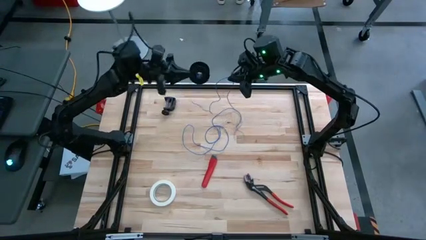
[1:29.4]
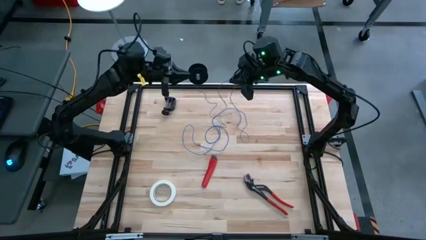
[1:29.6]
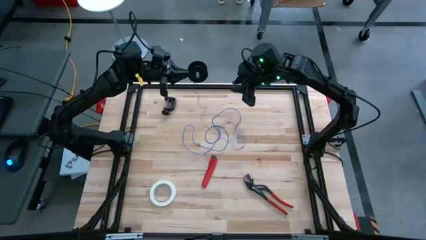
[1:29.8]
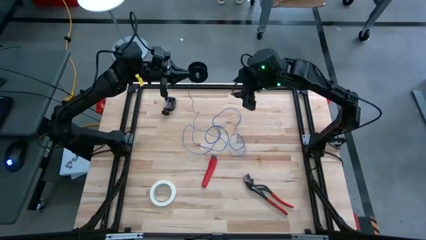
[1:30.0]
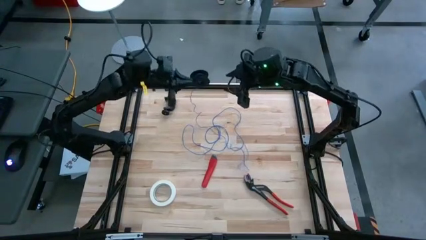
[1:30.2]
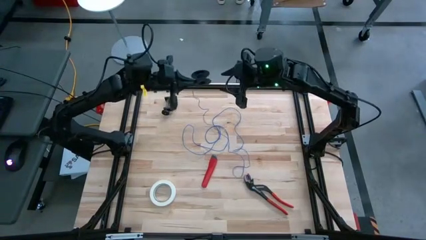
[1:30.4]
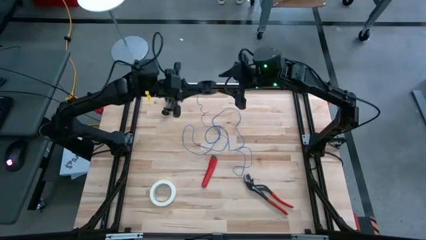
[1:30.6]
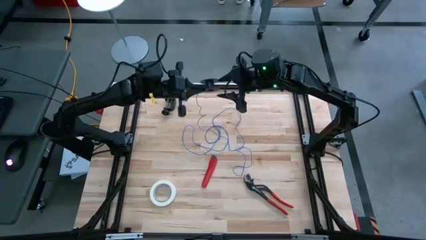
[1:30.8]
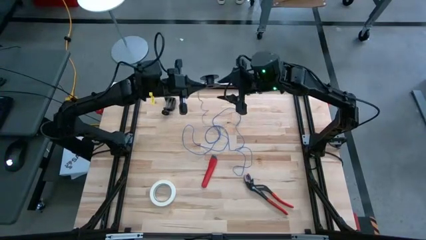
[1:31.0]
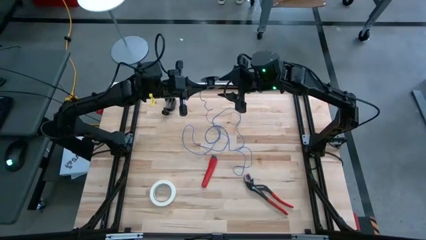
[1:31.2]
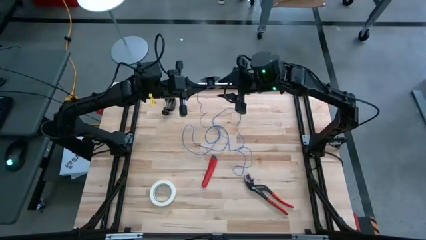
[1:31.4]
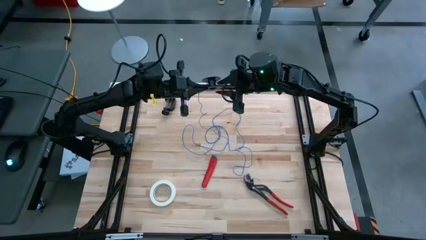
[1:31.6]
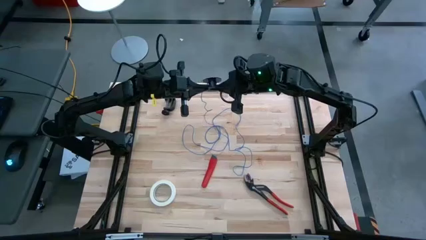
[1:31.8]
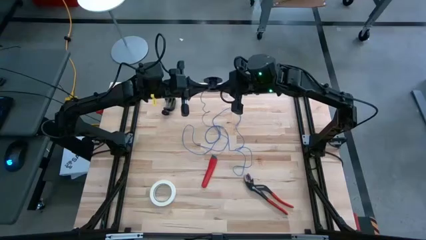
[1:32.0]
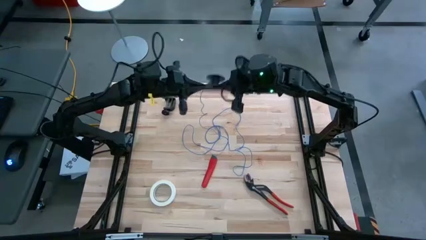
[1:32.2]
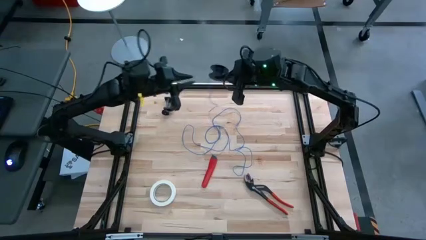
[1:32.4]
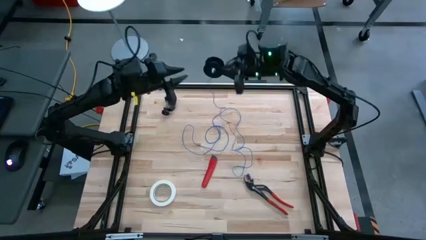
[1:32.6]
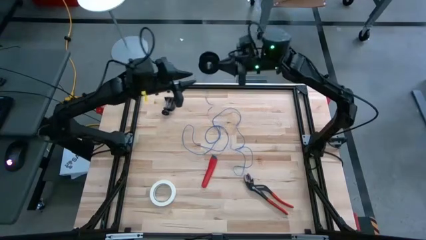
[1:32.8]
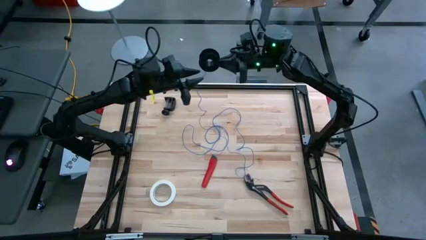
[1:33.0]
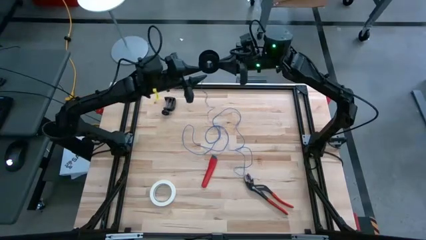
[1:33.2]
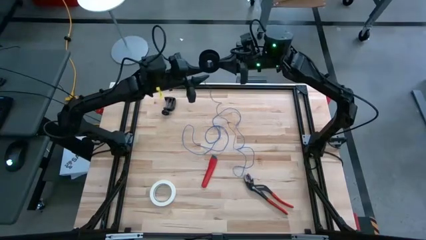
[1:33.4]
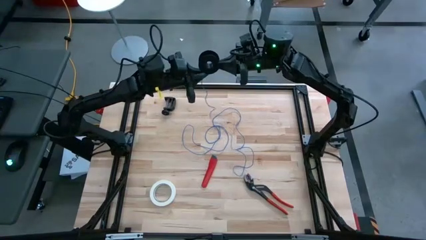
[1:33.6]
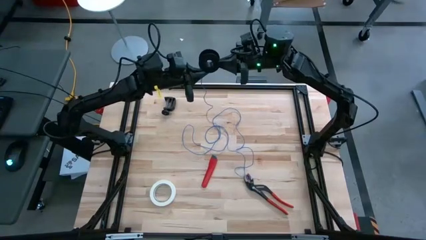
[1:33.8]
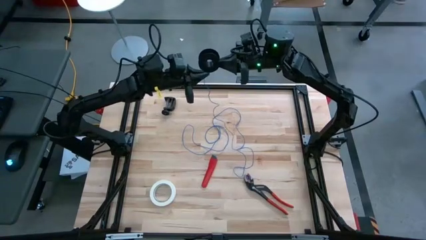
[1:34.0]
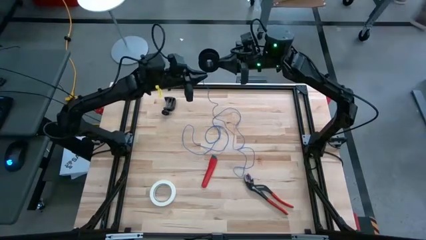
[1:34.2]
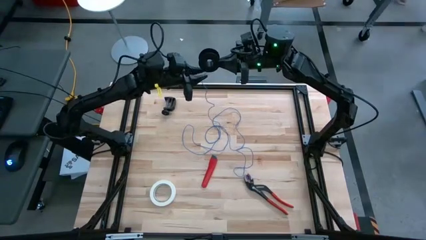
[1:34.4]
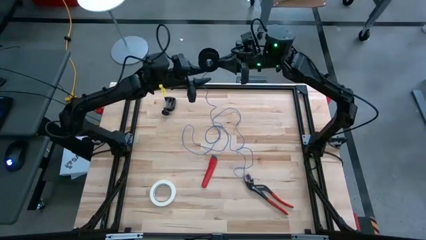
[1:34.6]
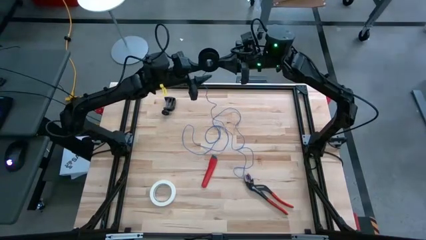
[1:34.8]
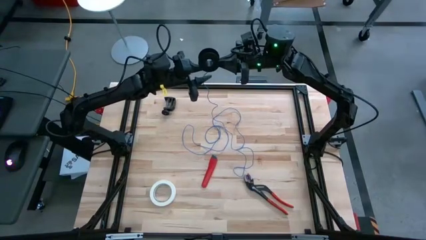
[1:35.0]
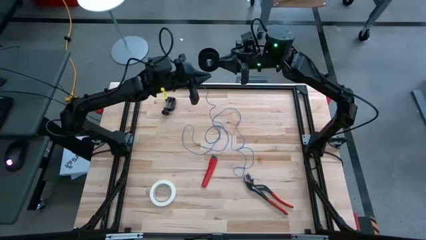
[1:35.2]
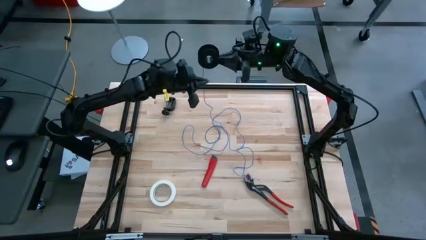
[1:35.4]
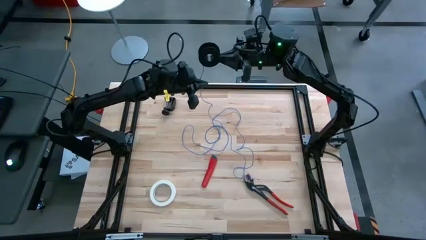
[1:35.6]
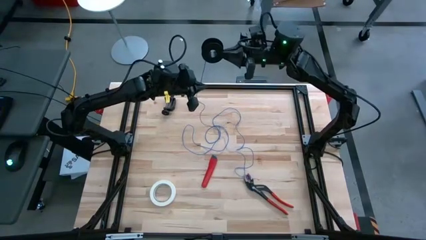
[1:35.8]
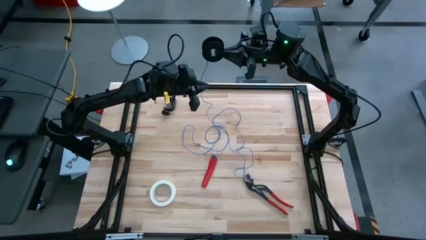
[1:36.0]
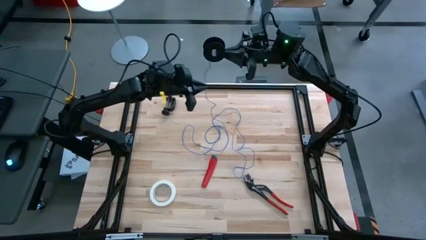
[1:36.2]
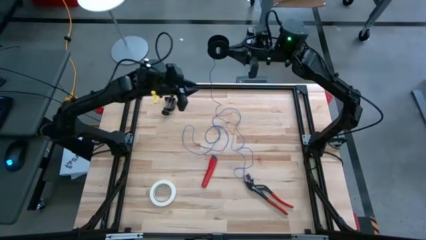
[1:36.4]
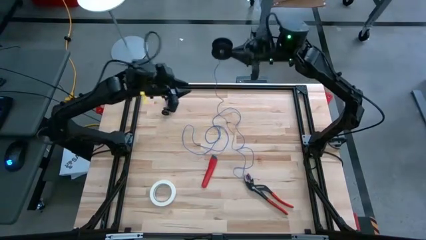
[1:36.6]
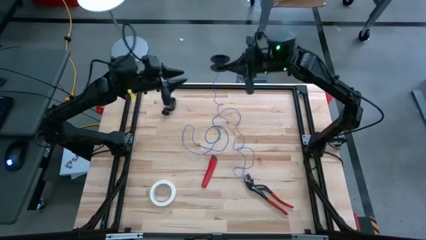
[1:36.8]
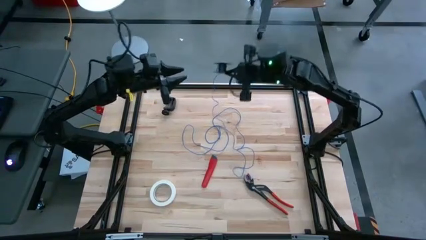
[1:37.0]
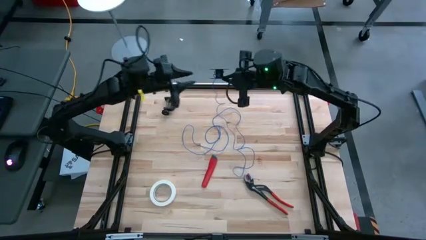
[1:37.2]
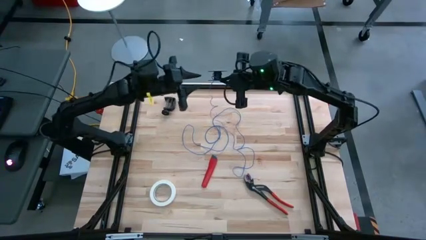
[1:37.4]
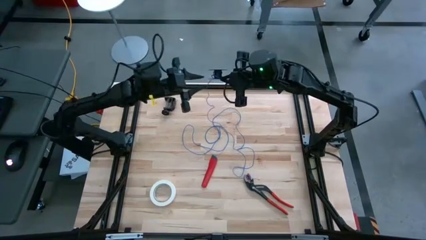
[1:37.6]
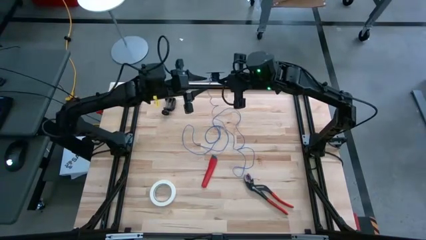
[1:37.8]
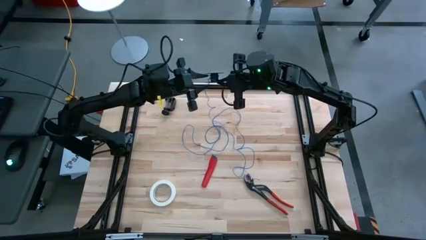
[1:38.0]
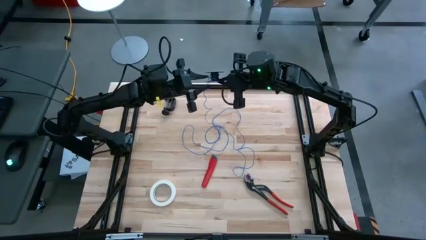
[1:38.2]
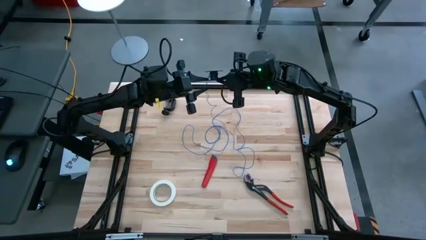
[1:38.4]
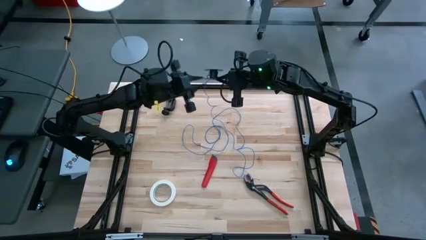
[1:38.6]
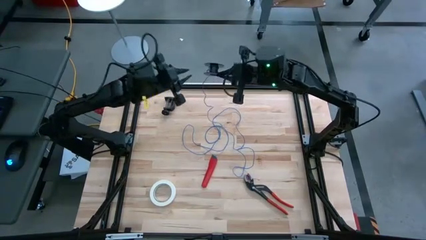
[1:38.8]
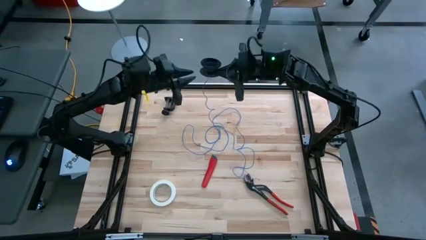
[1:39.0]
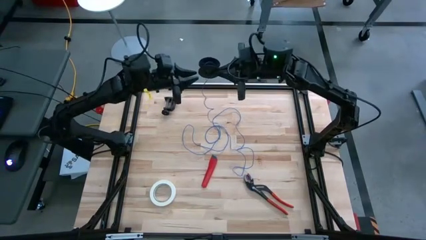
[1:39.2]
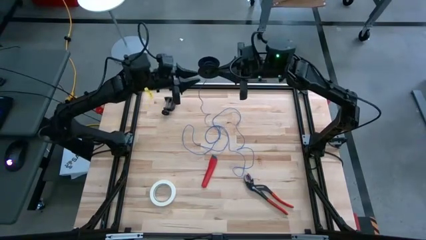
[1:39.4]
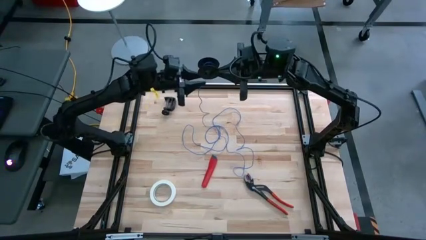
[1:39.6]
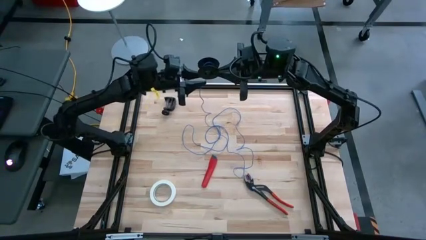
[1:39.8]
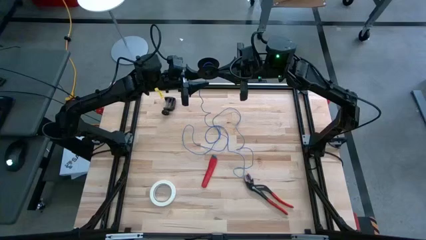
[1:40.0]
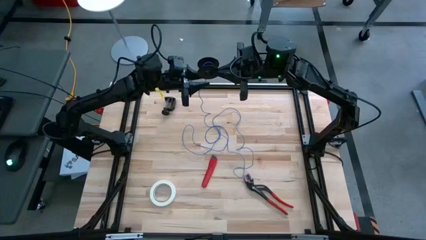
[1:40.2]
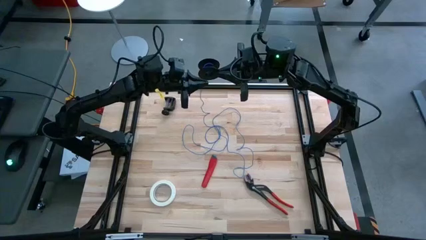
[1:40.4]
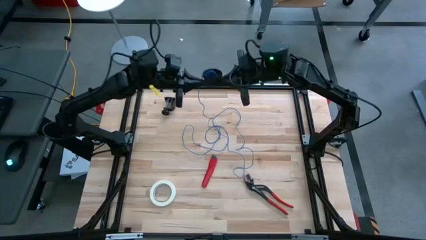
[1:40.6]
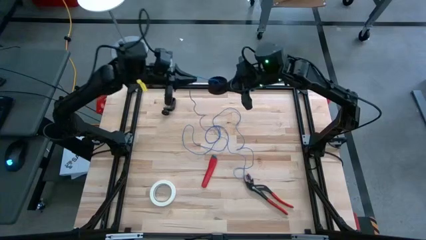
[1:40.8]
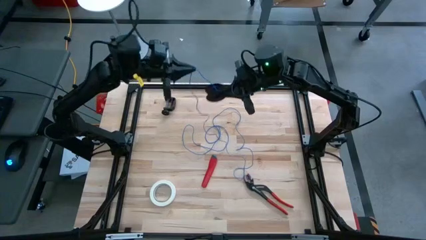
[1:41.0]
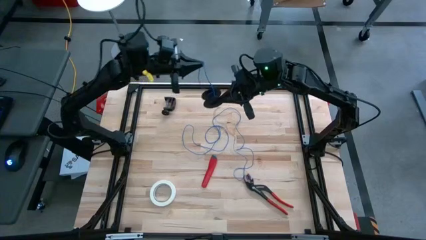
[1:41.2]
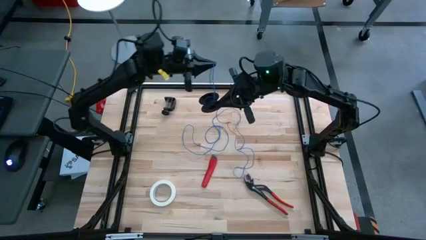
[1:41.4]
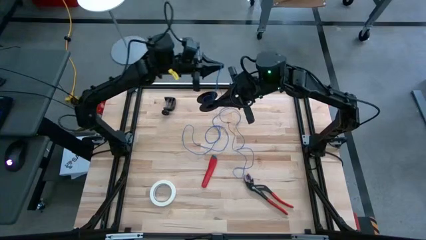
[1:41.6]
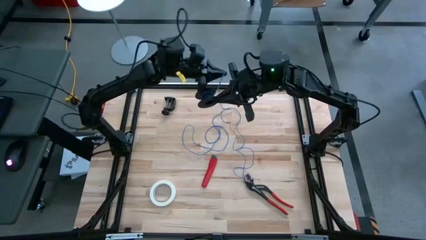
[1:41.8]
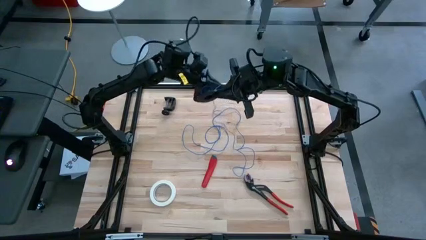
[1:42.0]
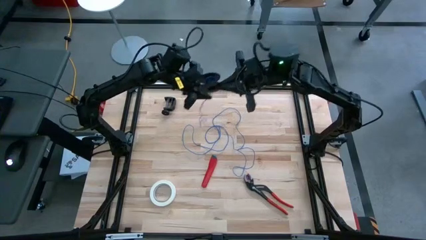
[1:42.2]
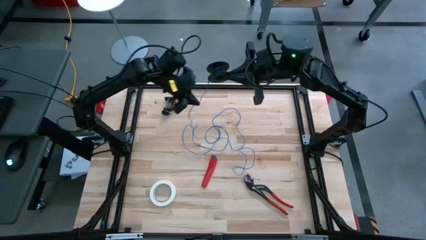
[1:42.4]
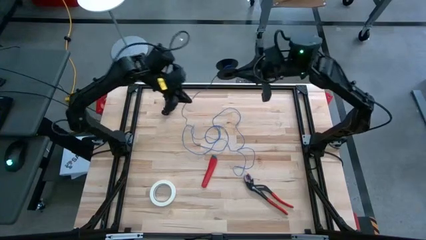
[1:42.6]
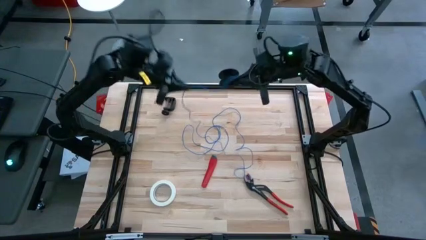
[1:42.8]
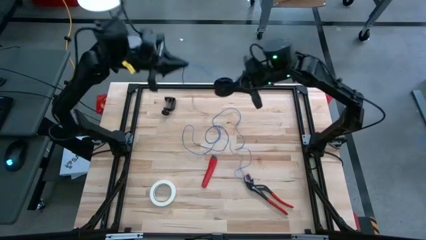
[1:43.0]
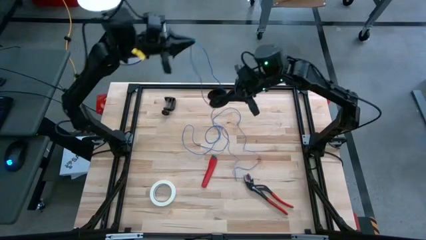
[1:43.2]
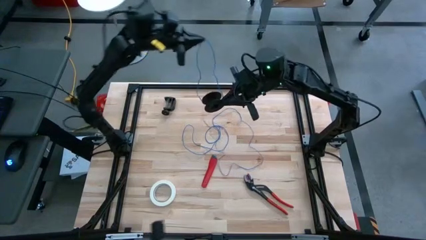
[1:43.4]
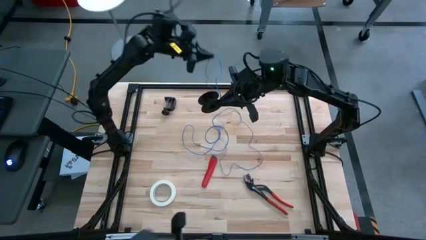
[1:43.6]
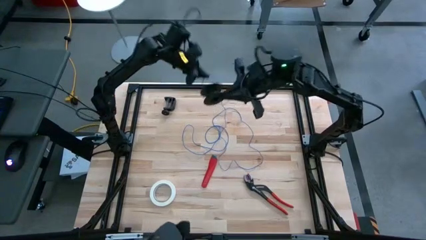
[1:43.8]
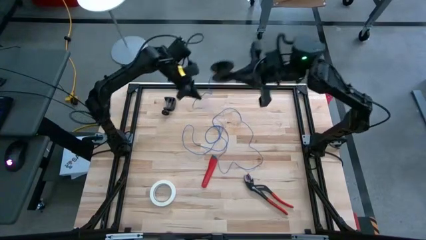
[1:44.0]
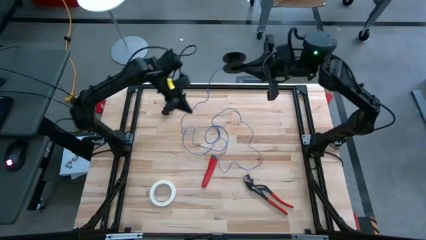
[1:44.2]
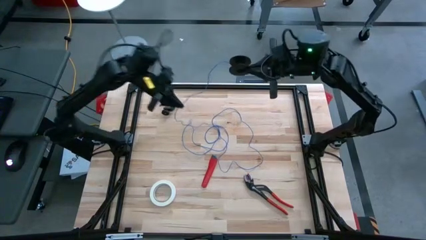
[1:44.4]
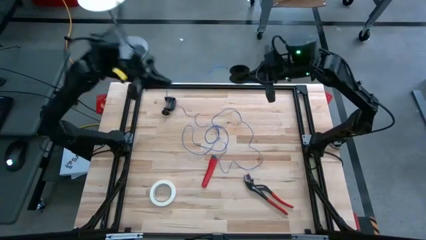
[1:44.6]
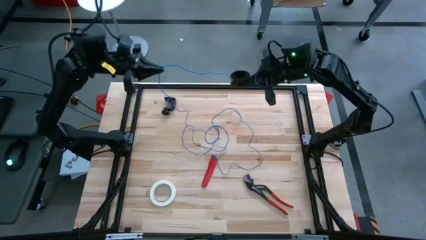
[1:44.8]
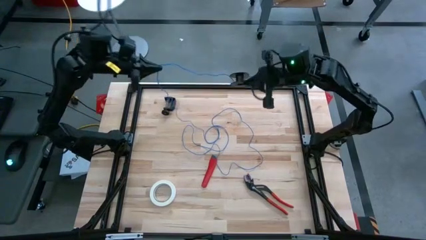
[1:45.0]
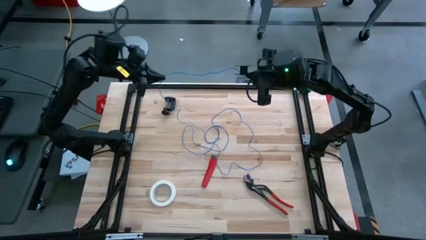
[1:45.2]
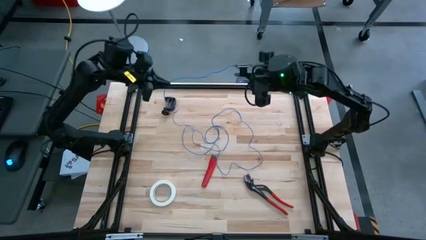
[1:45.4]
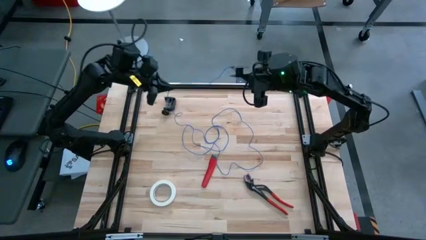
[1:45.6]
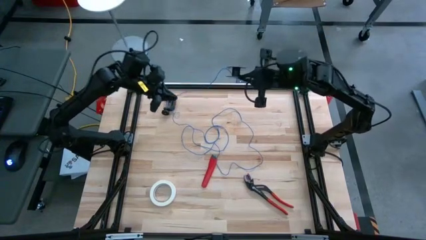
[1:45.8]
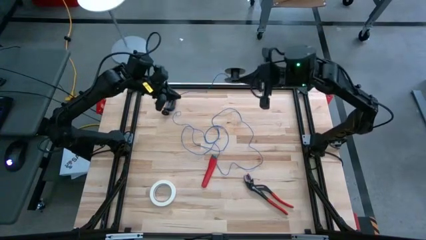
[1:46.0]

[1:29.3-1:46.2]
Task: Coil cords
Uncoil the blue wire cable from the black spool
